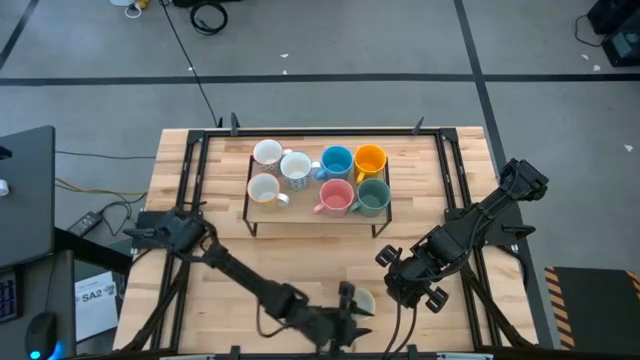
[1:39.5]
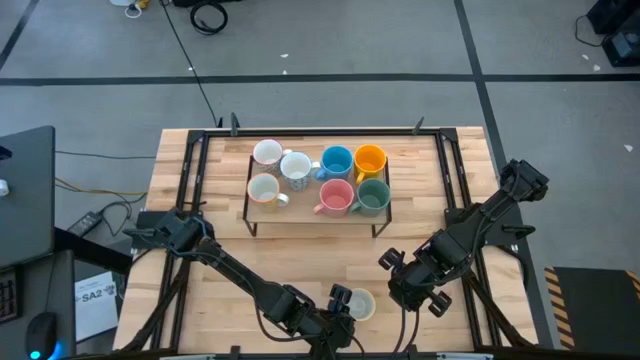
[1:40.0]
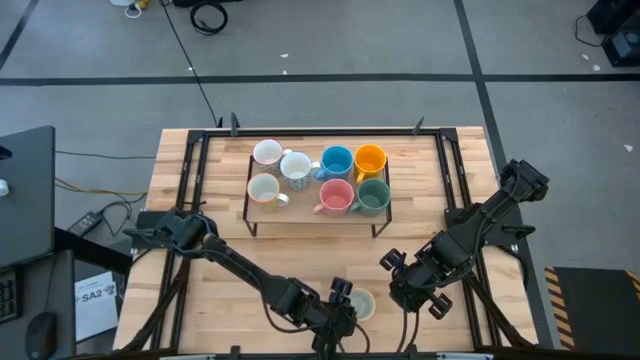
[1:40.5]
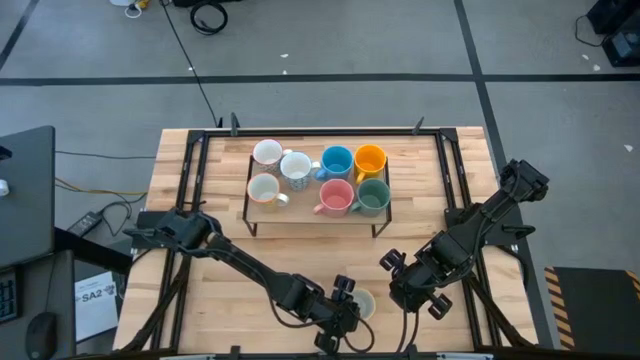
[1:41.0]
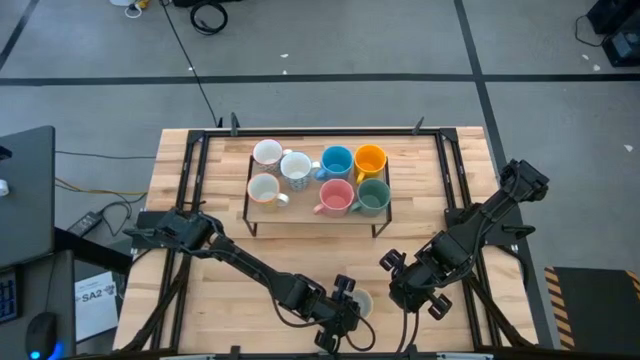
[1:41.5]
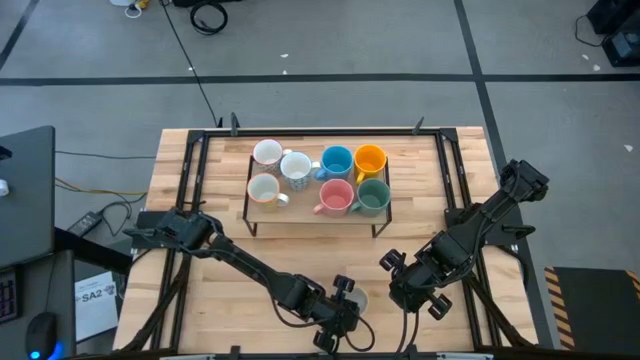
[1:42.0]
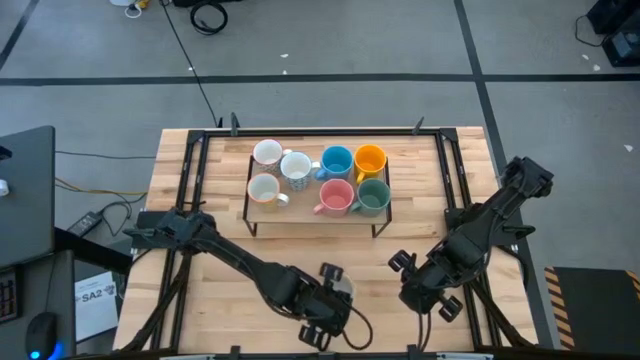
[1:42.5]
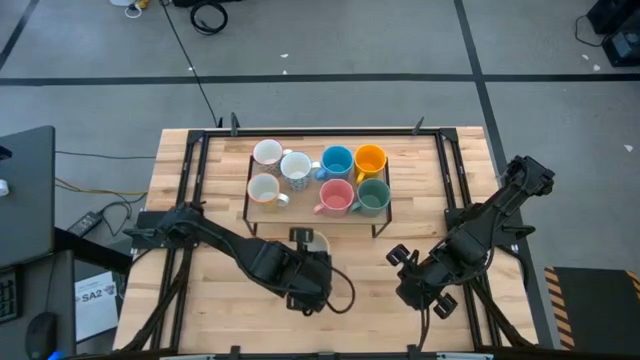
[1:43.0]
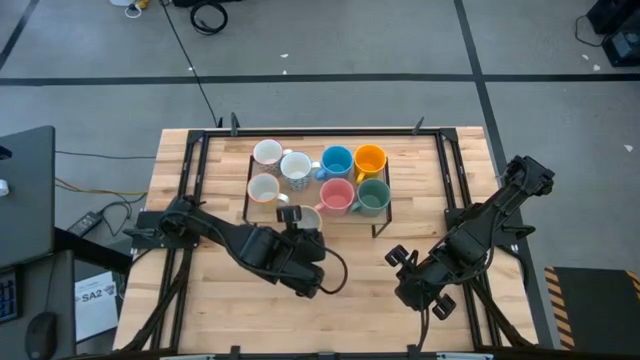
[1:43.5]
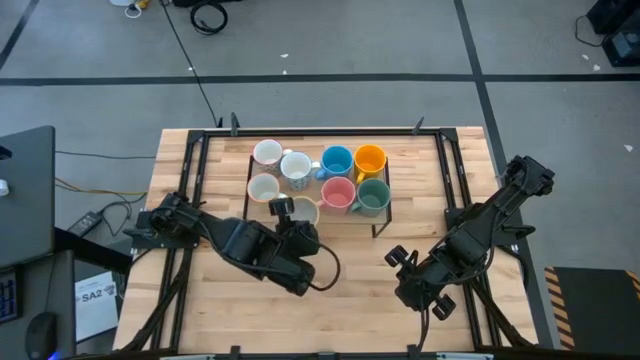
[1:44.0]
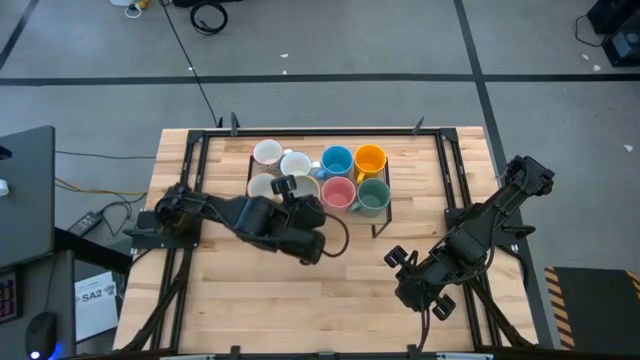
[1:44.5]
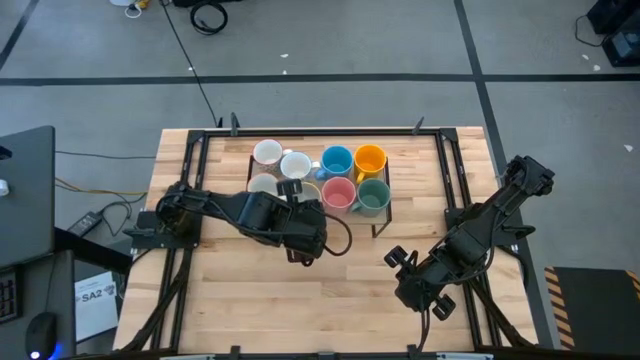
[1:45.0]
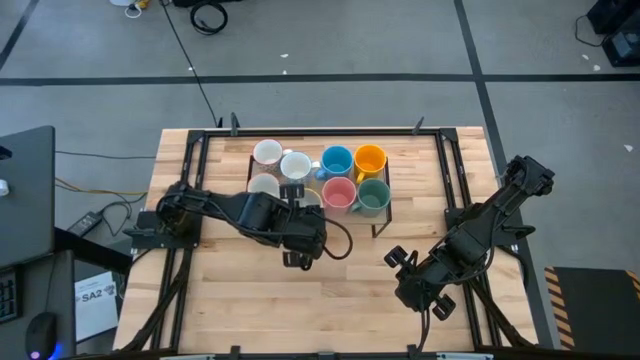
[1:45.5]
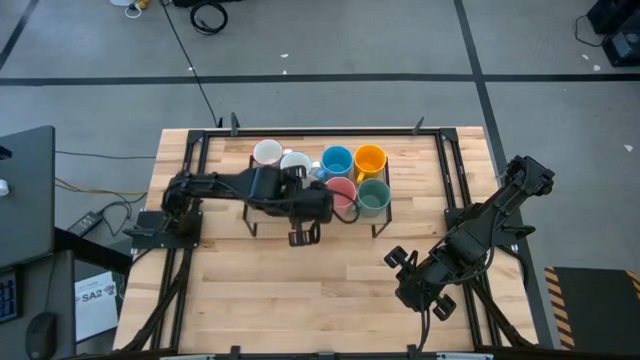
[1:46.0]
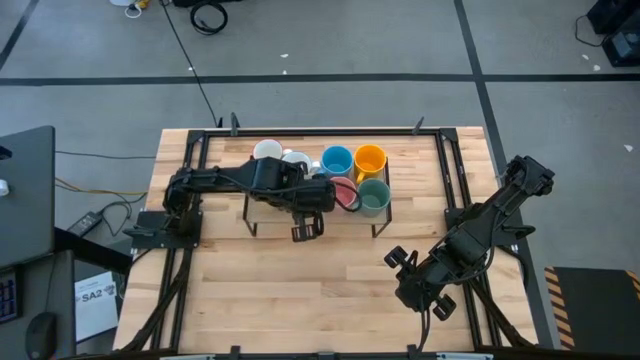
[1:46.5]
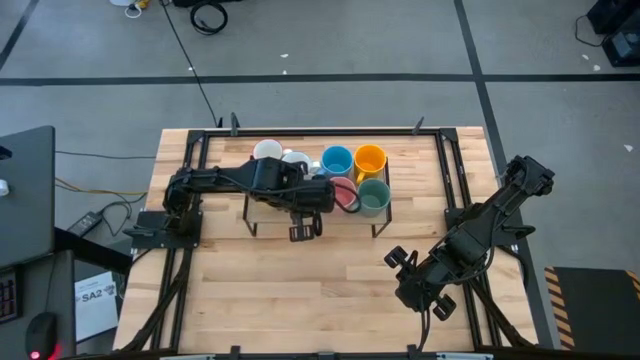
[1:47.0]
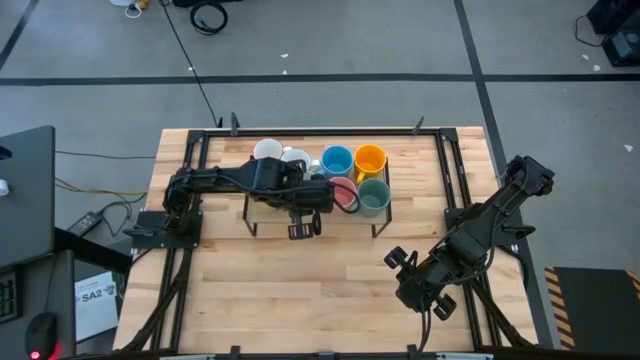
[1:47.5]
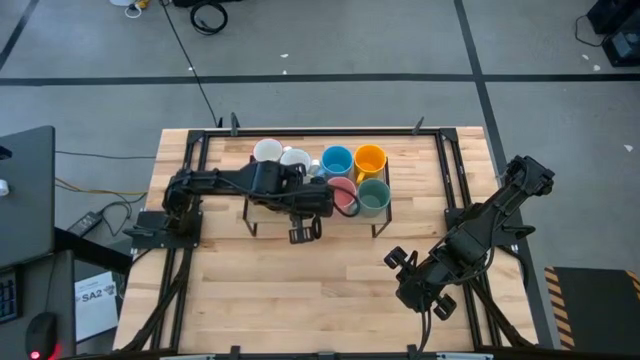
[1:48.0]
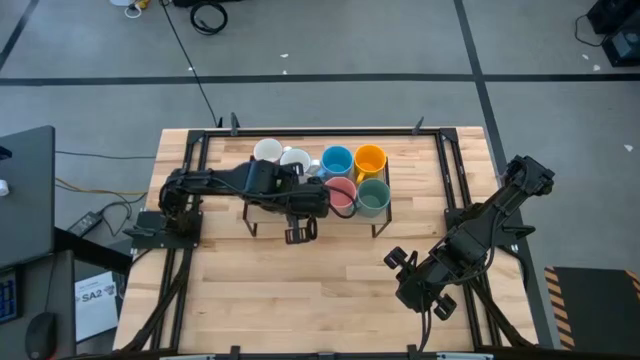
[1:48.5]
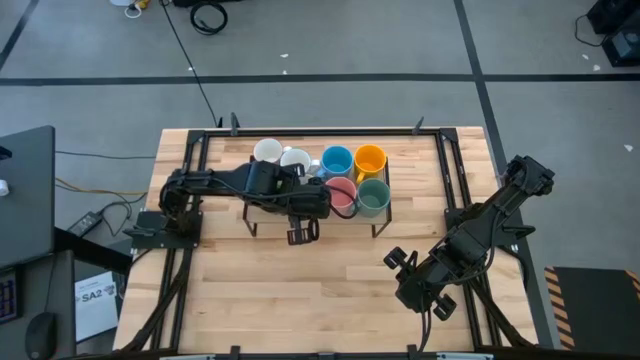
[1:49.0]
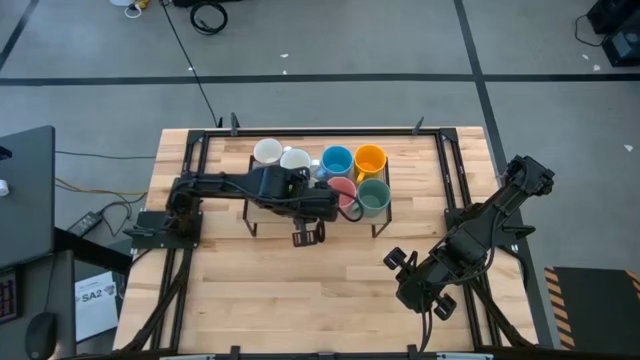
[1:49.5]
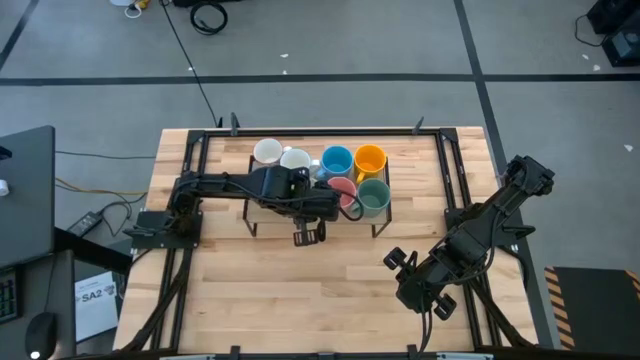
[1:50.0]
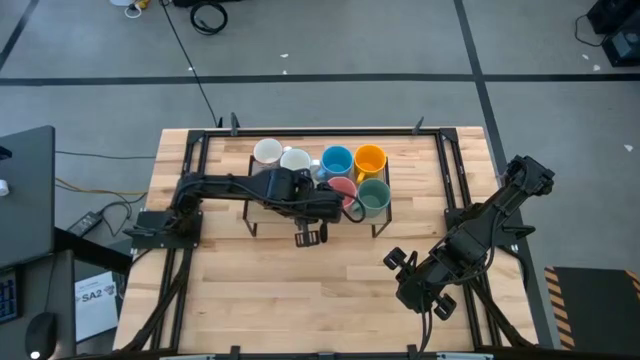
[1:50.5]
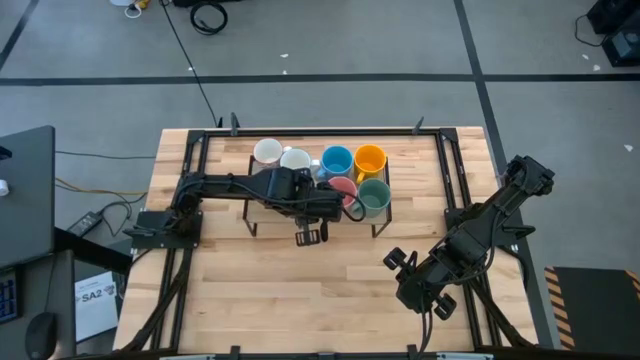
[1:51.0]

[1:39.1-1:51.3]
Task: Place coffee mugs
Put the orange patterned mug on the shelf

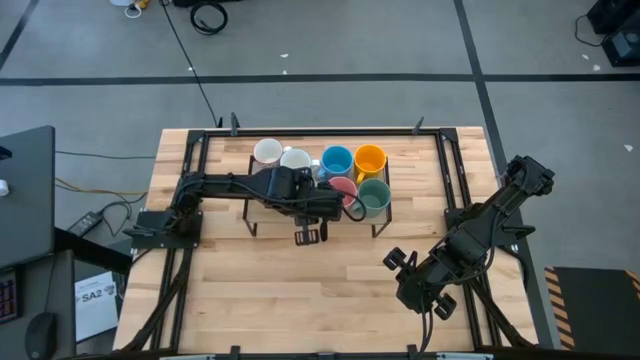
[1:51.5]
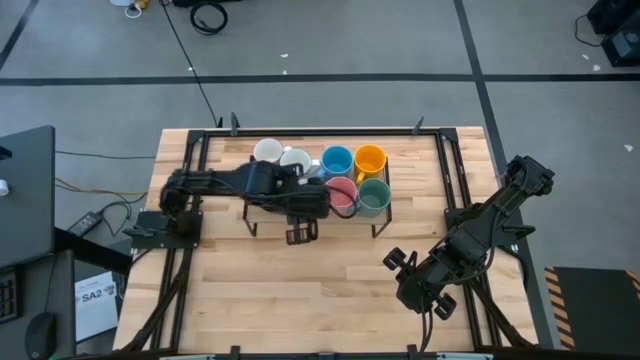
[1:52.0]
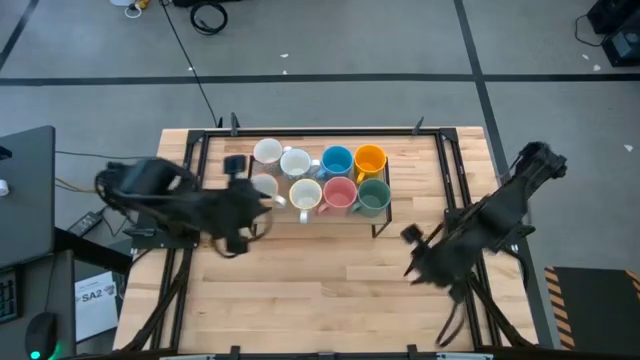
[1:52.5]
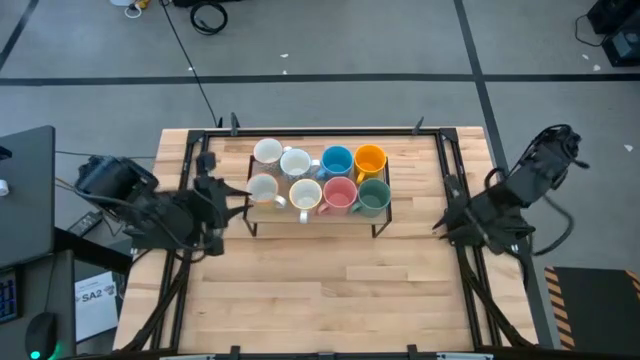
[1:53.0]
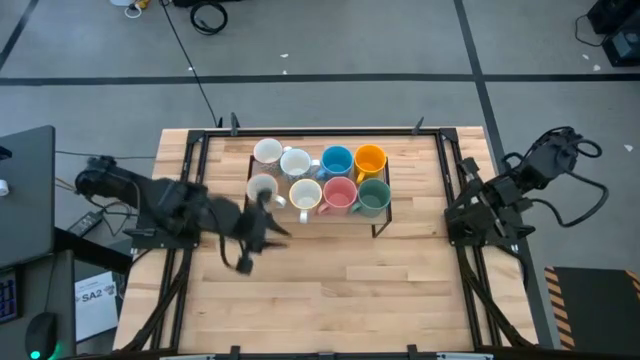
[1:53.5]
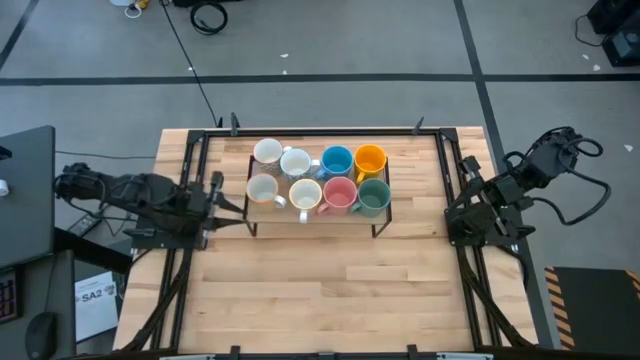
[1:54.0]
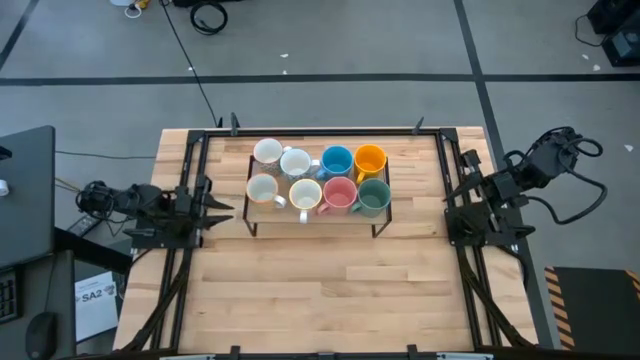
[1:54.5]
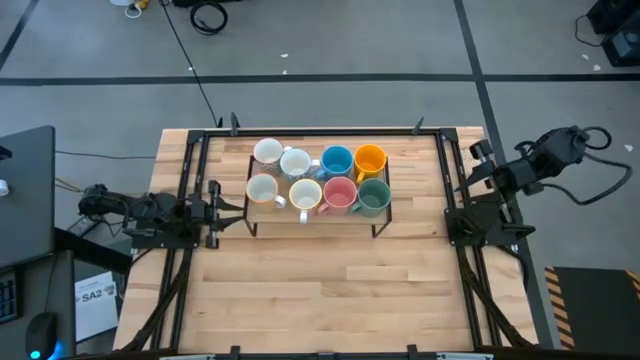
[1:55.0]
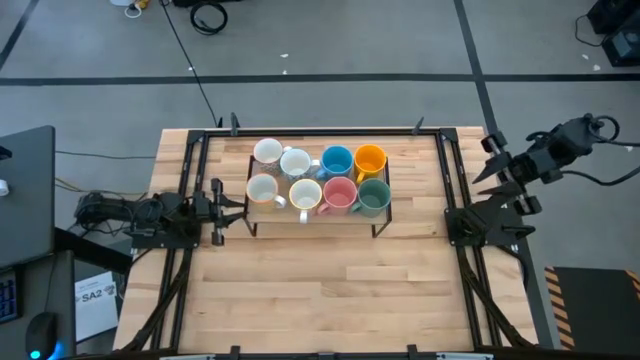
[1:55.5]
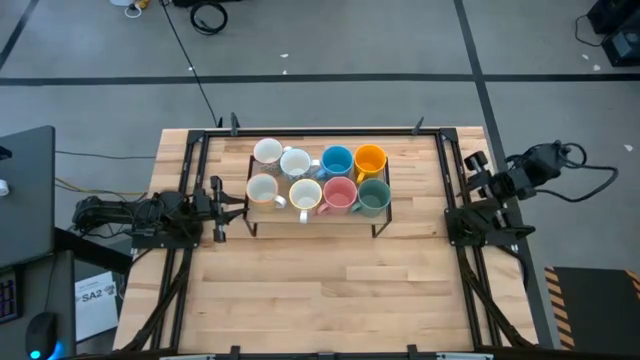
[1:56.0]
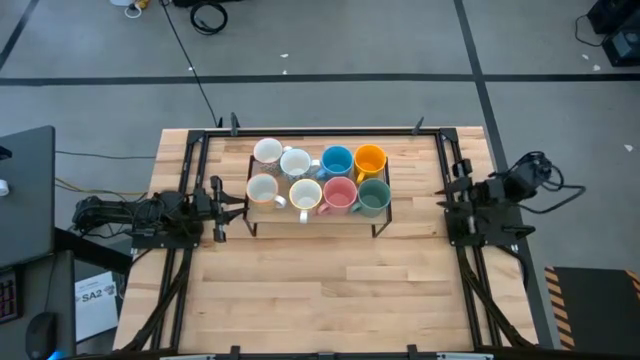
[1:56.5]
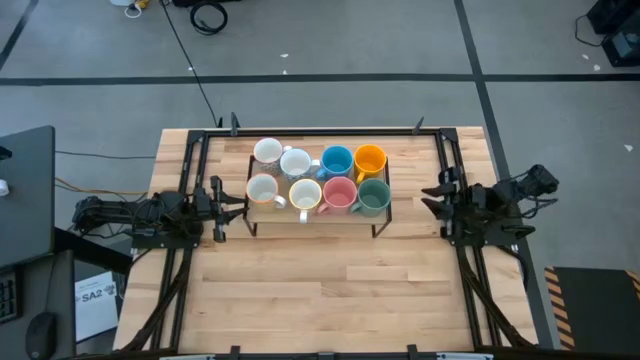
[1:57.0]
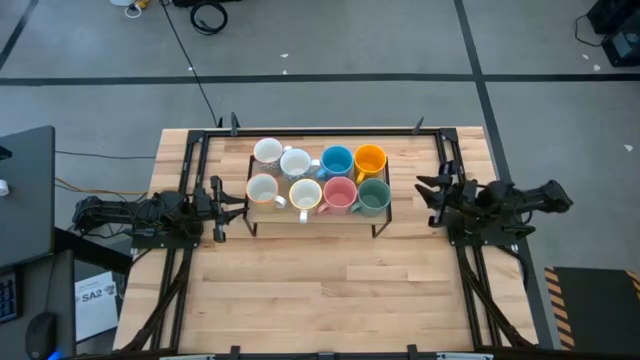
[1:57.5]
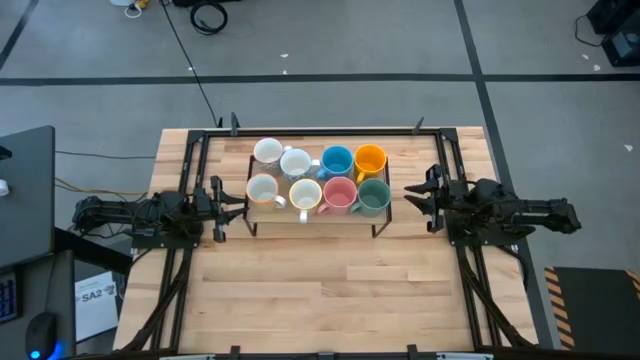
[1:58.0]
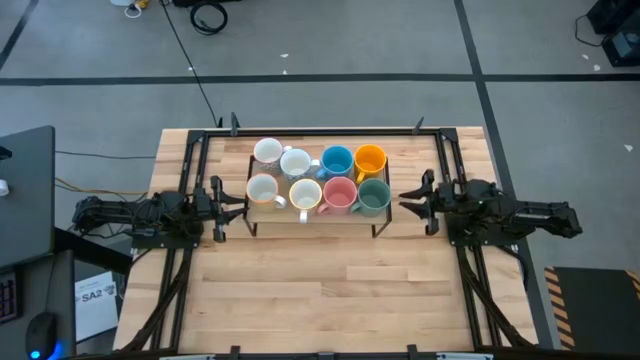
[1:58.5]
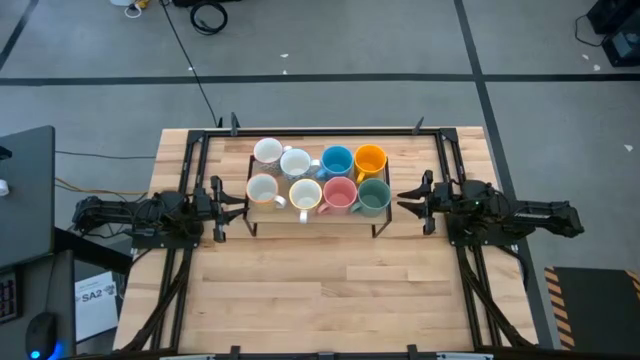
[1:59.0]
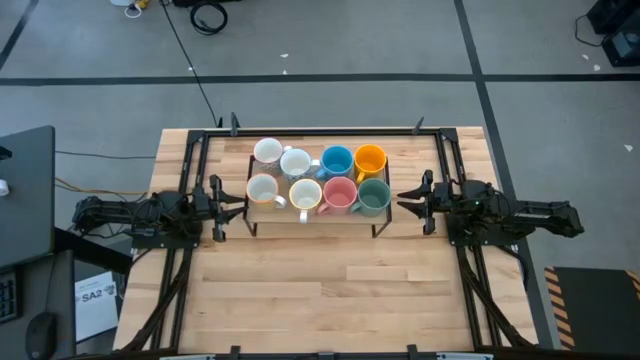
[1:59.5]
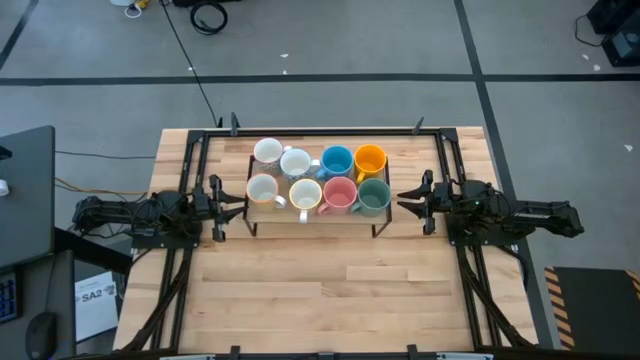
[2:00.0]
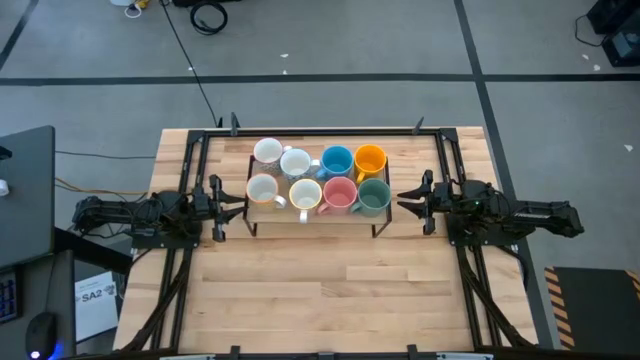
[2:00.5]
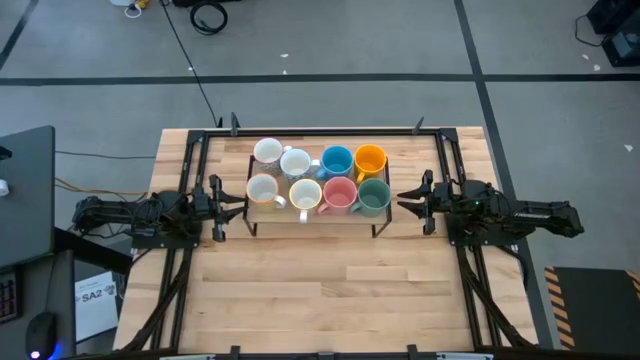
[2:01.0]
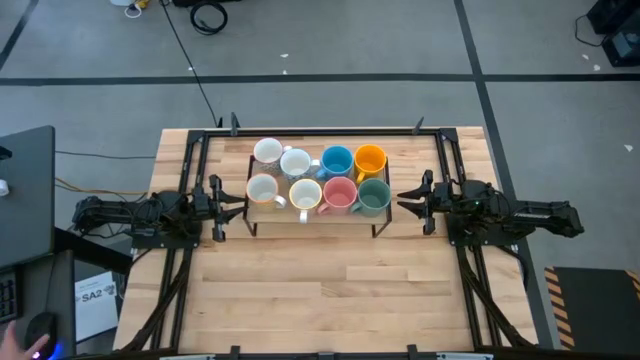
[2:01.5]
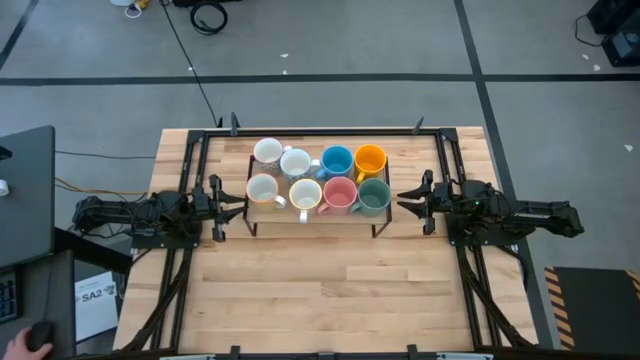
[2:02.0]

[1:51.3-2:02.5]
Return to Home Position
